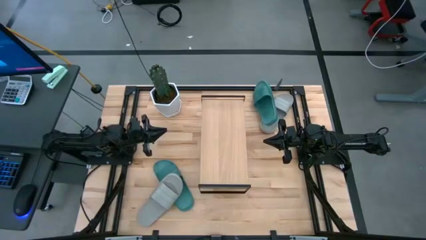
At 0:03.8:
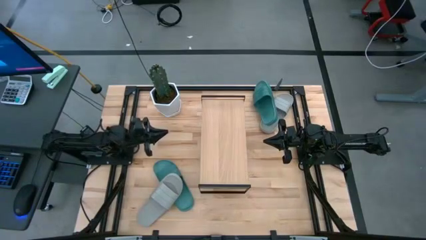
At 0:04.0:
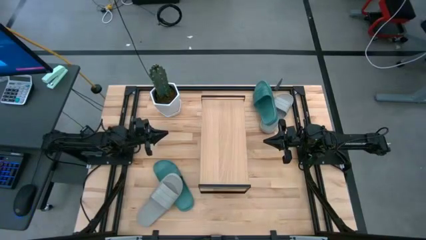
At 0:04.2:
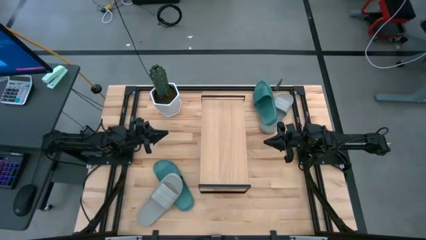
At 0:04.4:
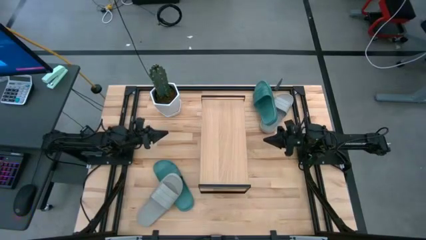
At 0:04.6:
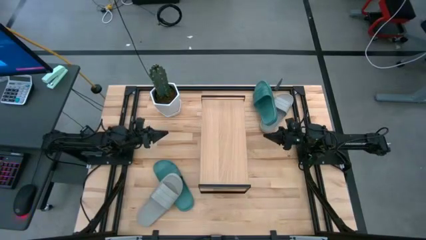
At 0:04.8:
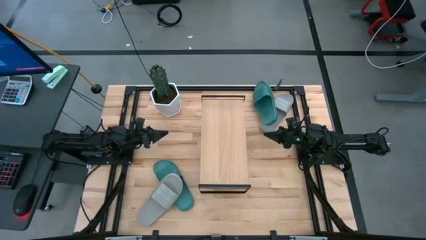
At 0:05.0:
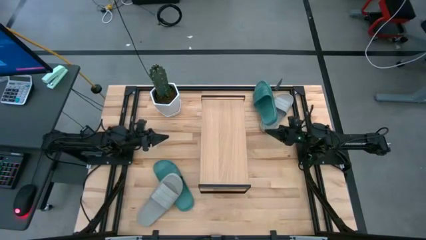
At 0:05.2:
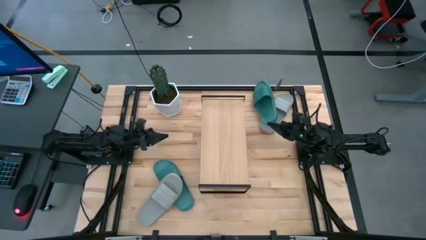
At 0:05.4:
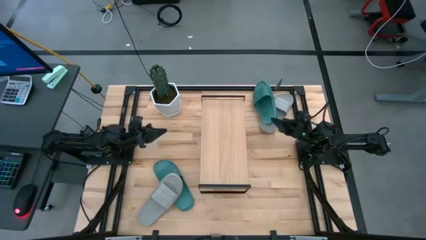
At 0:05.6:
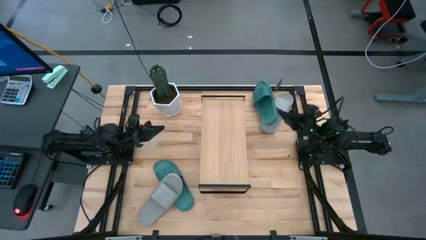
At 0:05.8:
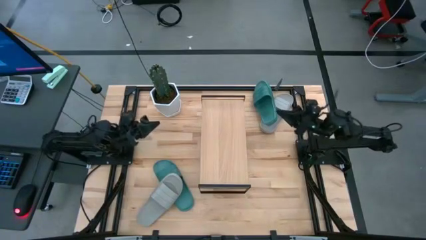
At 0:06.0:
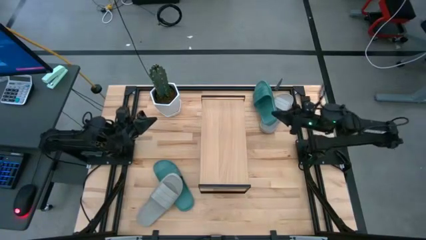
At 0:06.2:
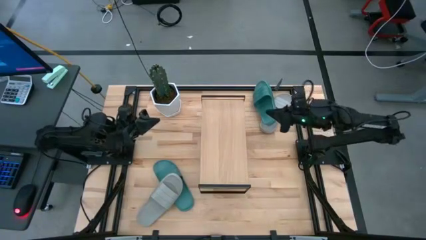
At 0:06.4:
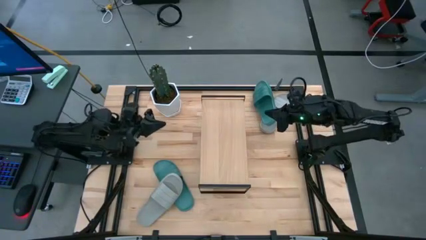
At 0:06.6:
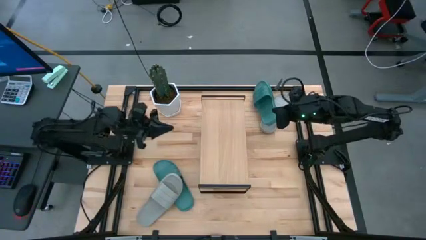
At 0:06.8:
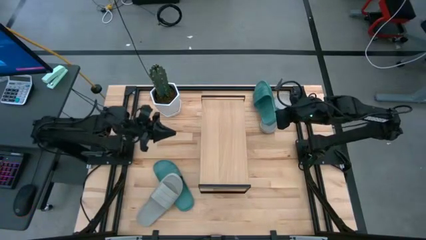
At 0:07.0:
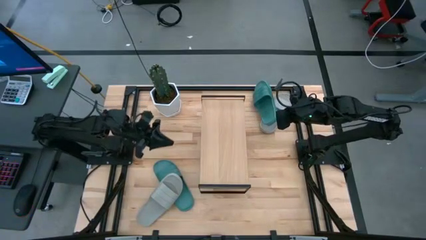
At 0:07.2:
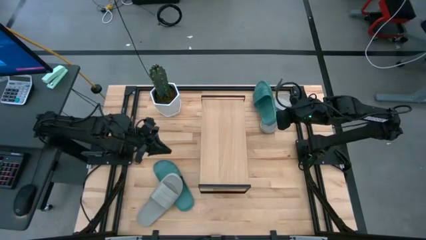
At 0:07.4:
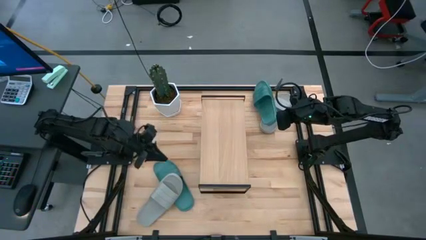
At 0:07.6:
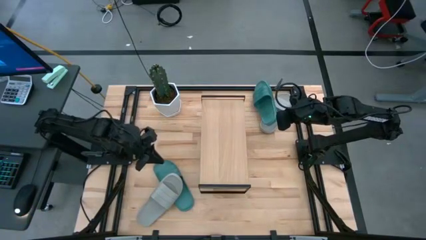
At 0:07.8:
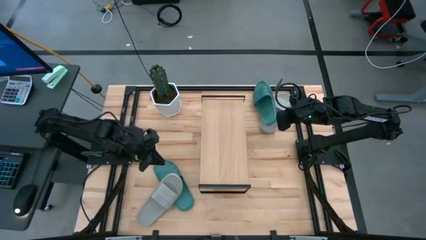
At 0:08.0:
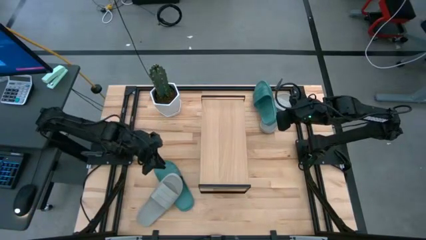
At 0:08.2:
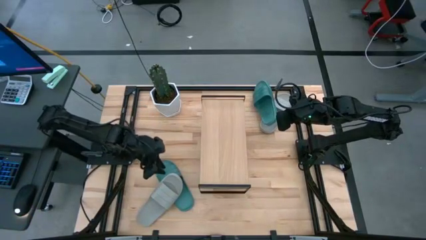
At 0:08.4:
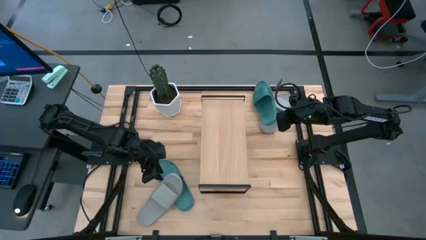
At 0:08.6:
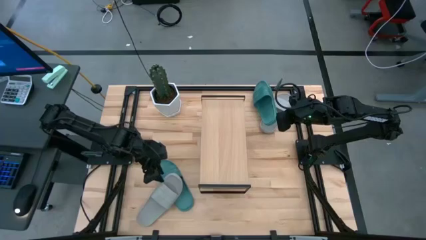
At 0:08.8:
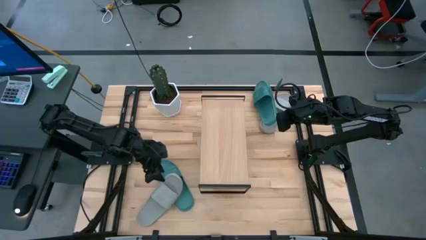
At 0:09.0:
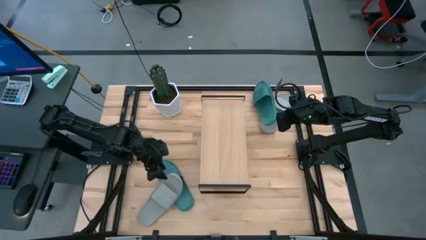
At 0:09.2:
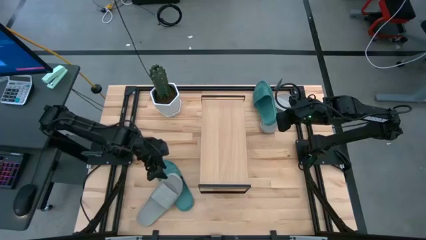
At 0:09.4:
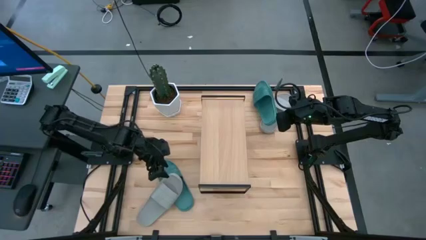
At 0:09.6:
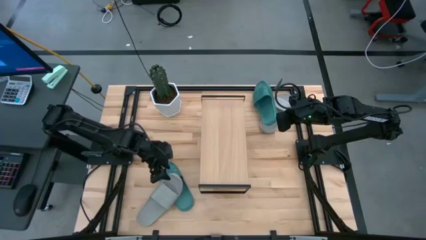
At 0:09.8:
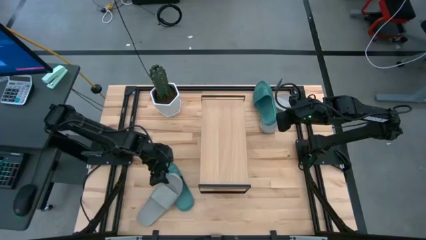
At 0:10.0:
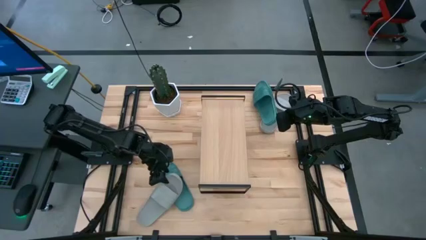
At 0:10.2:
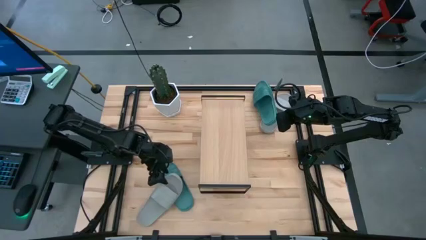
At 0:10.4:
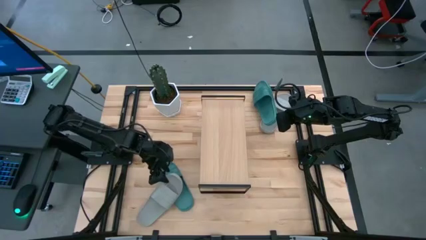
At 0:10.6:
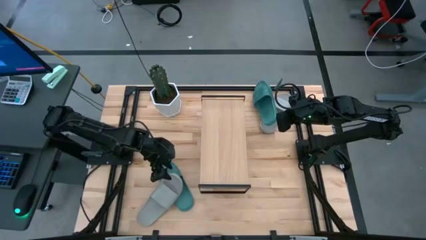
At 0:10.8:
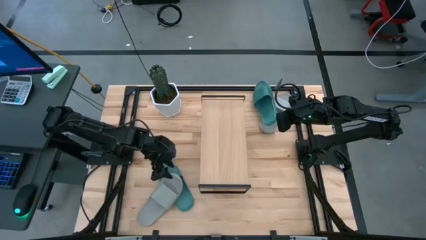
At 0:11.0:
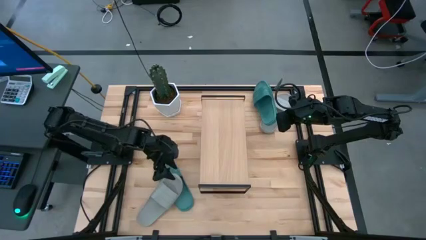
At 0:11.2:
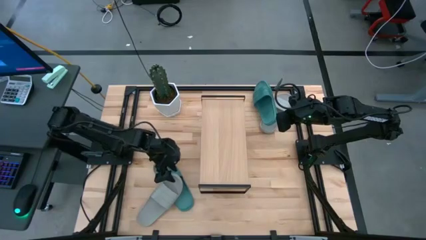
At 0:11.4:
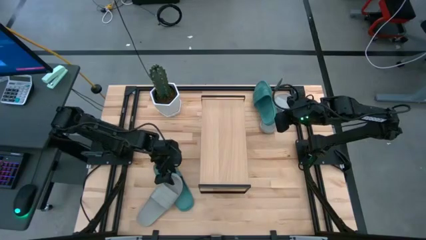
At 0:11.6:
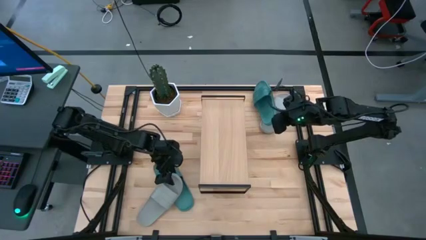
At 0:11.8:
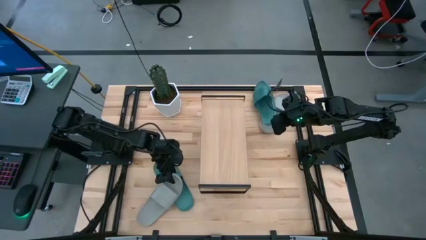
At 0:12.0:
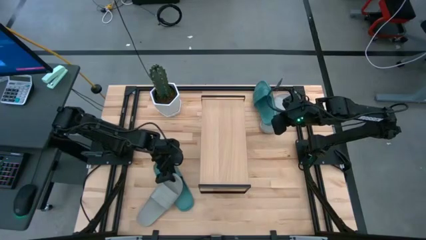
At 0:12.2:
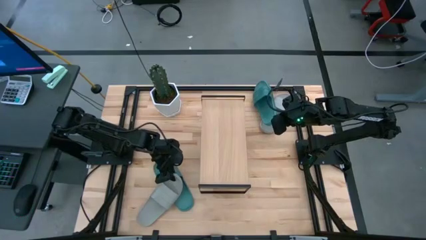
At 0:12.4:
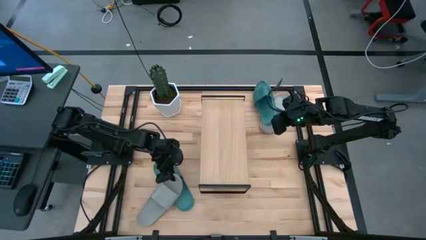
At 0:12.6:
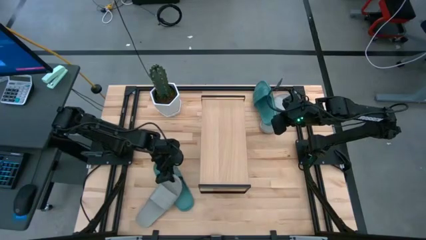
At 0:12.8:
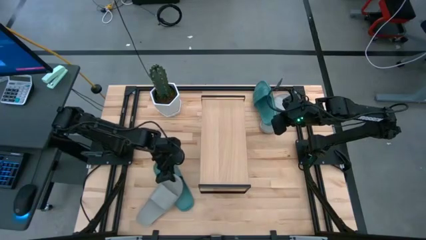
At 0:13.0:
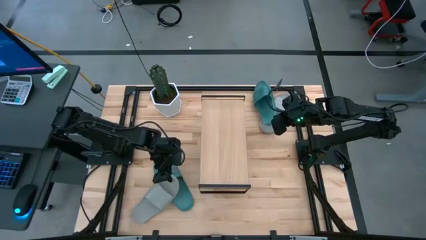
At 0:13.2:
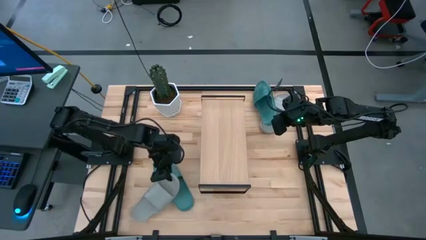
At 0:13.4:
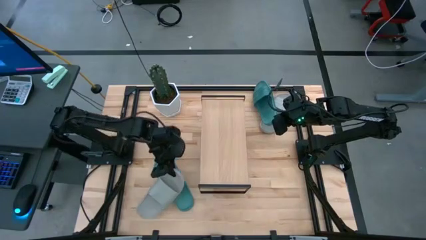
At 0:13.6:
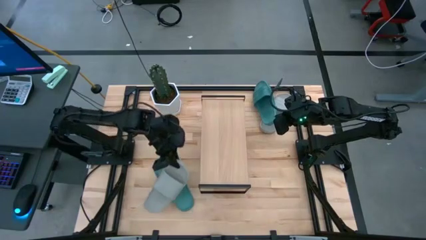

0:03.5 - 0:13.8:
Task: Pick and place slides into the shelf
Put the bottom gray slipper on the shelf
